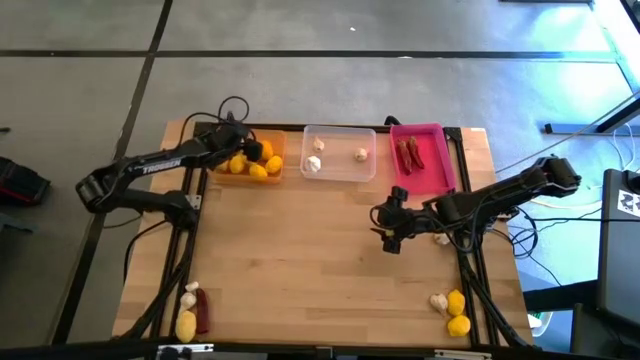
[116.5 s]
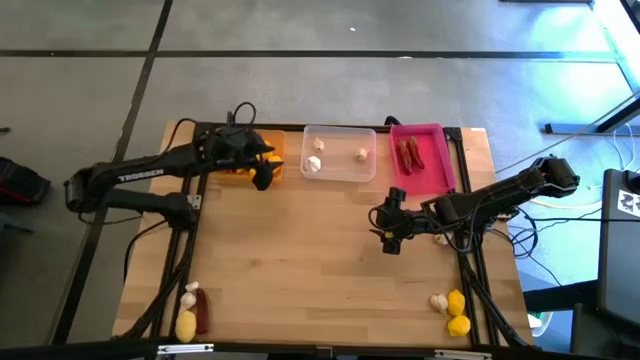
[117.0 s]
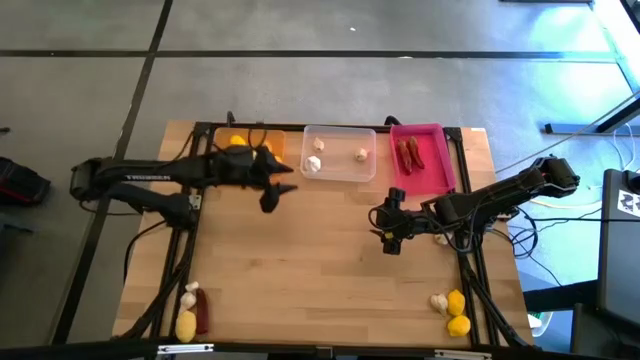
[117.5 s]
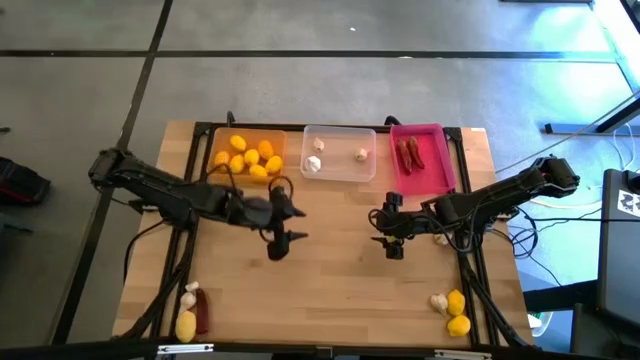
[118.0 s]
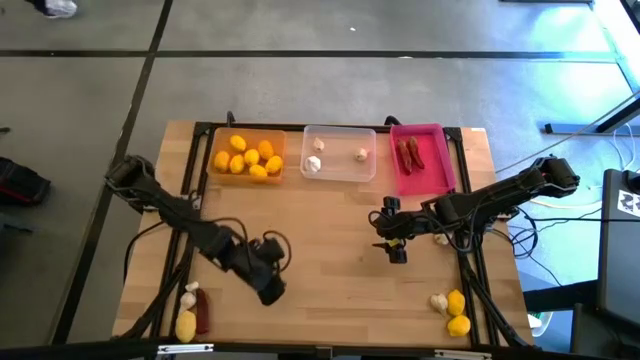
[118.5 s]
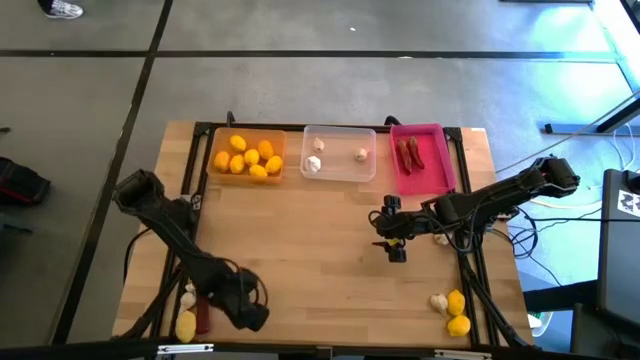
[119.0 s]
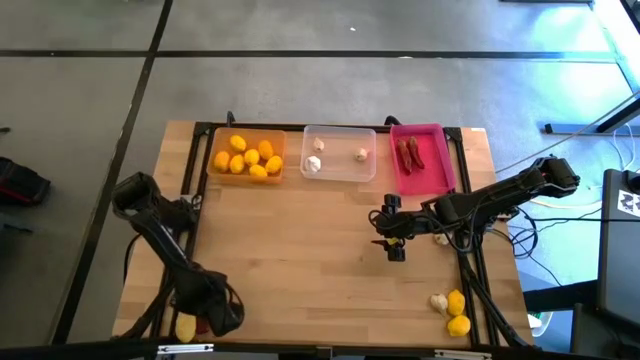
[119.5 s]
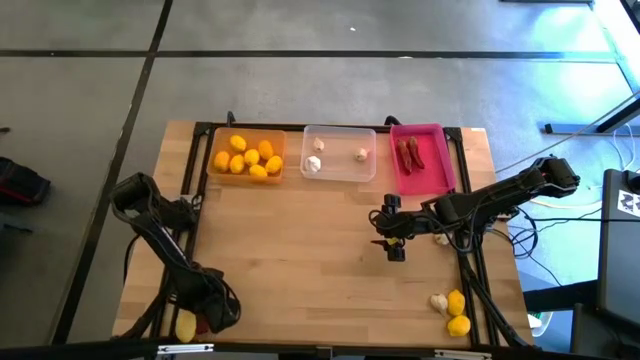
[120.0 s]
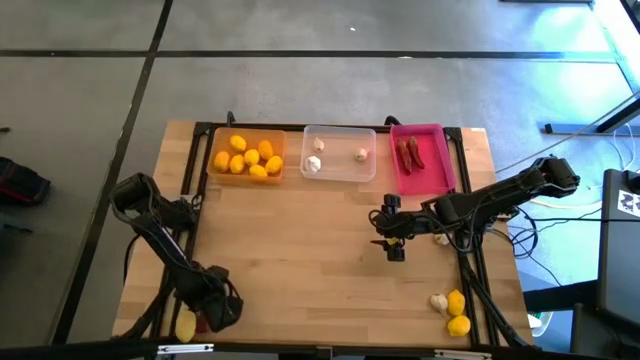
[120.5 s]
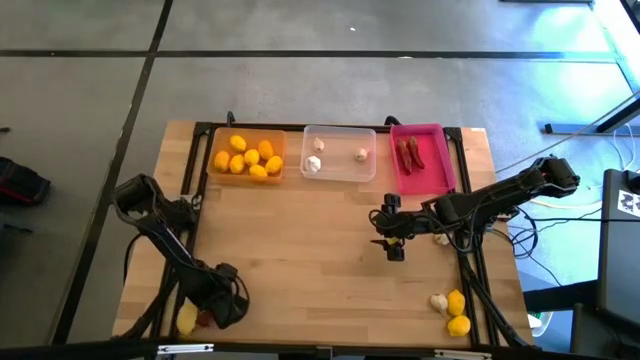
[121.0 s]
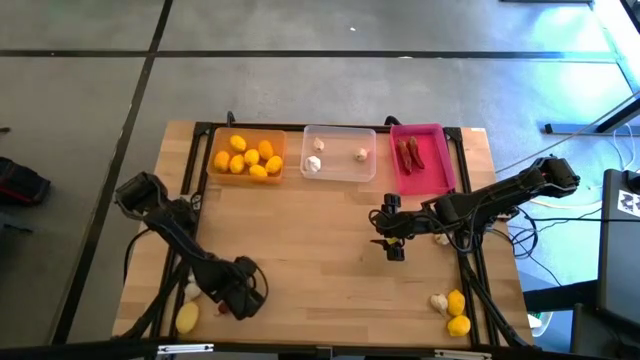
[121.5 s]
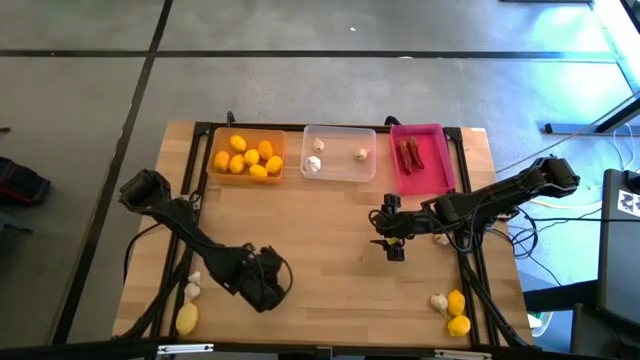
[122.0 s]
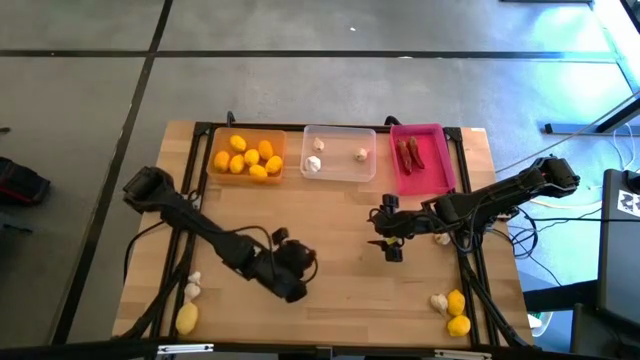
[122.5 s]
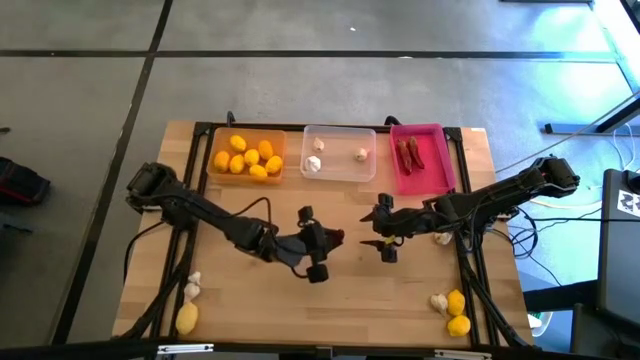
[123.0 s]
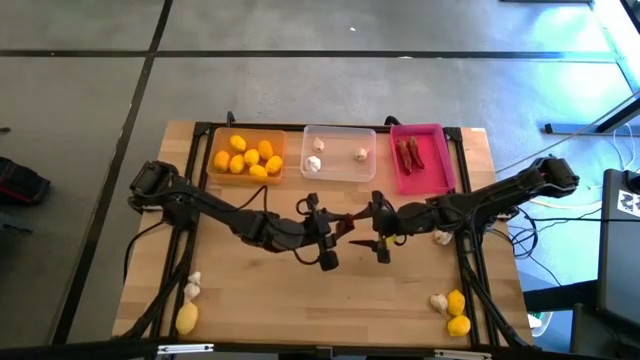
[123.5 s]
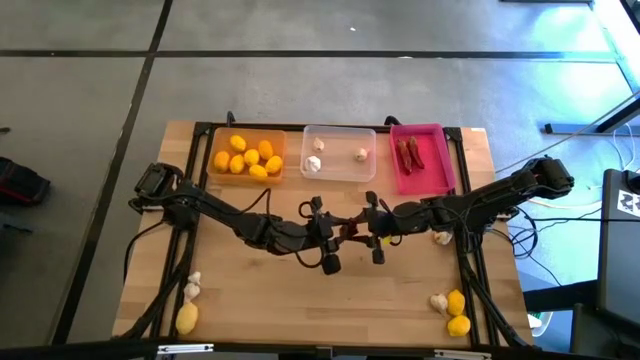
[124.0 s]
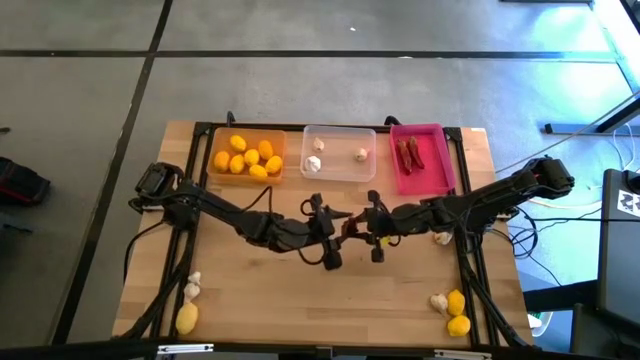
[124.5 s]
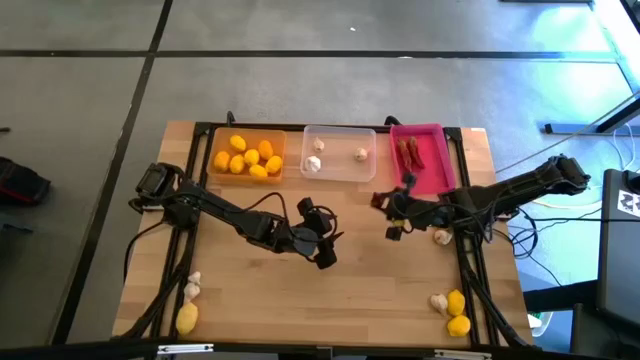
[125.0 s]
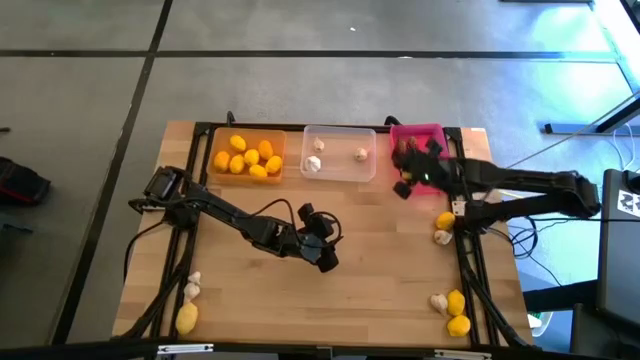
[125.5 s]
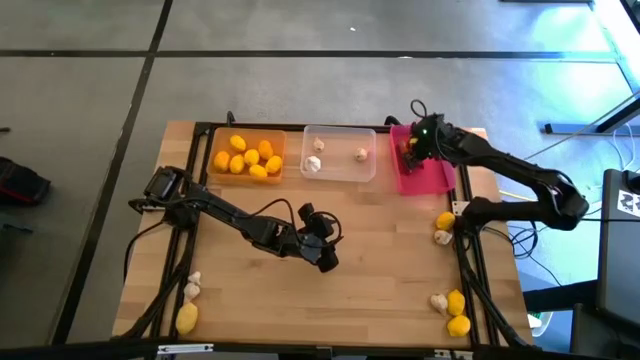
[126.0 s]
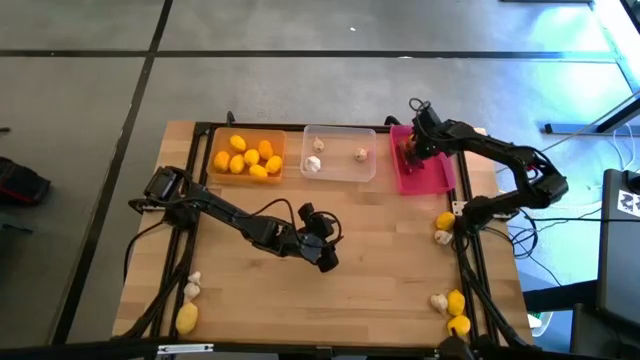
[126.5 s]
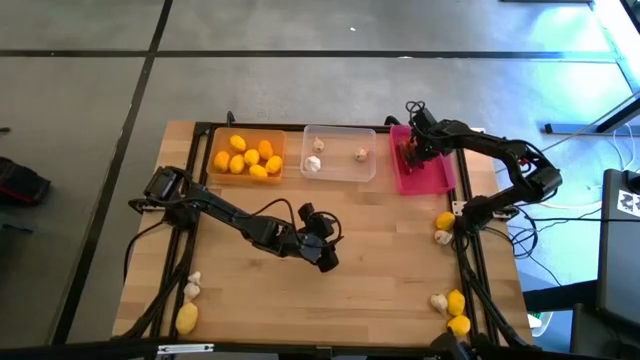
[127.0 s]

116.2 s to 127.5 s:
Task: Sort produce into baskets
Put the red chili pepper into the red bin

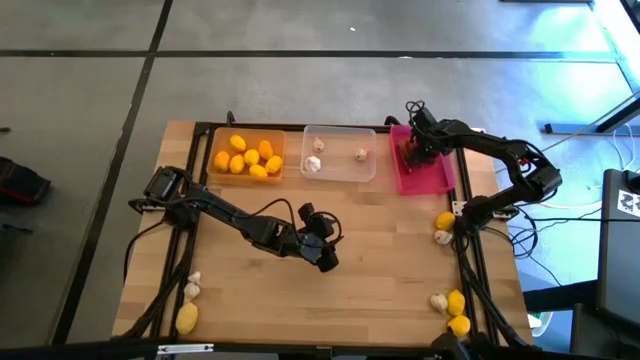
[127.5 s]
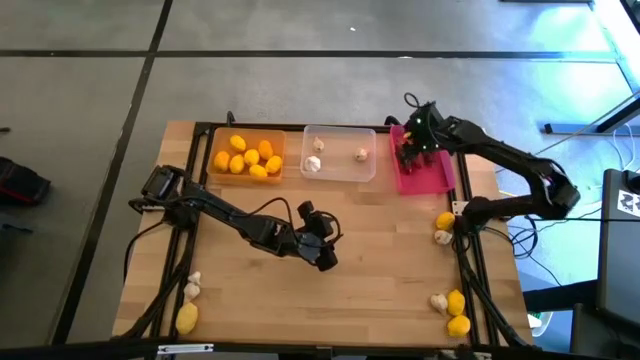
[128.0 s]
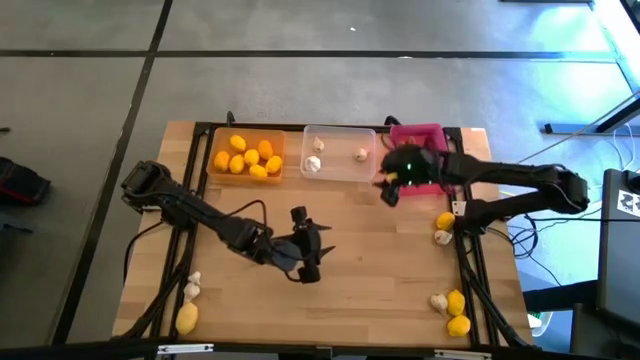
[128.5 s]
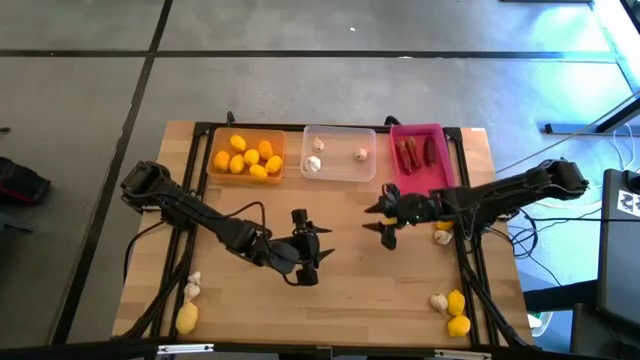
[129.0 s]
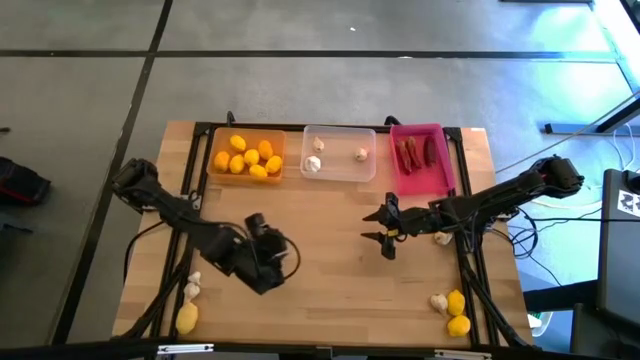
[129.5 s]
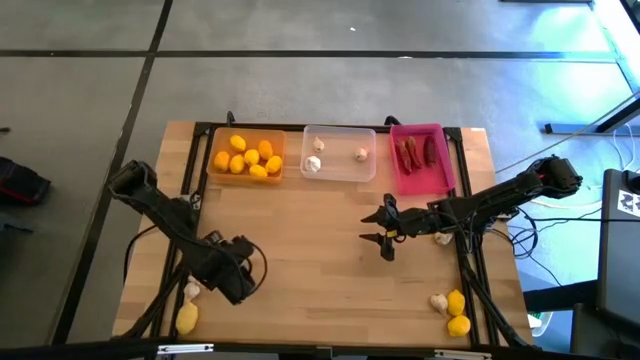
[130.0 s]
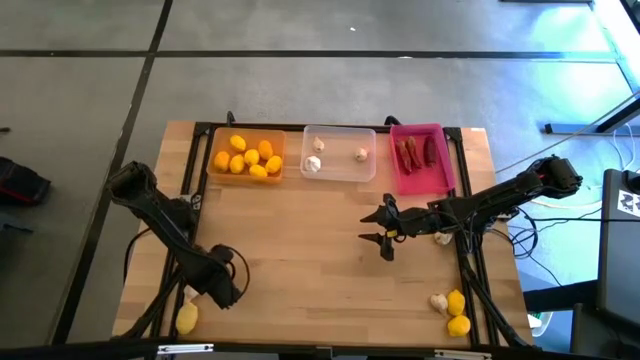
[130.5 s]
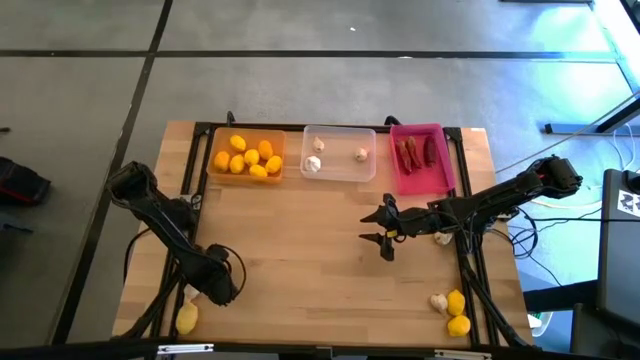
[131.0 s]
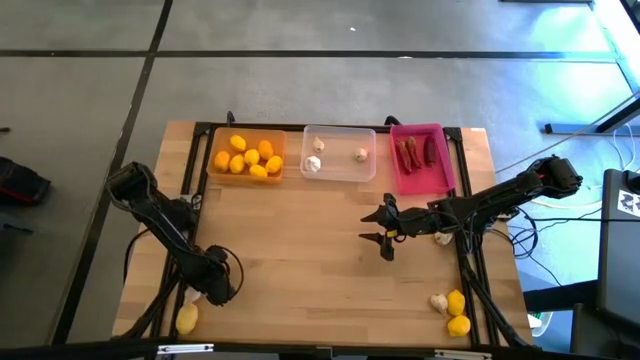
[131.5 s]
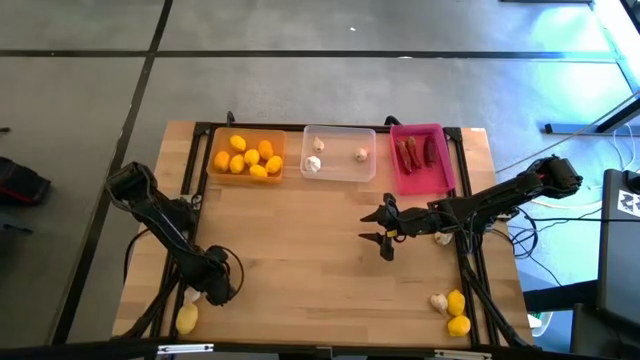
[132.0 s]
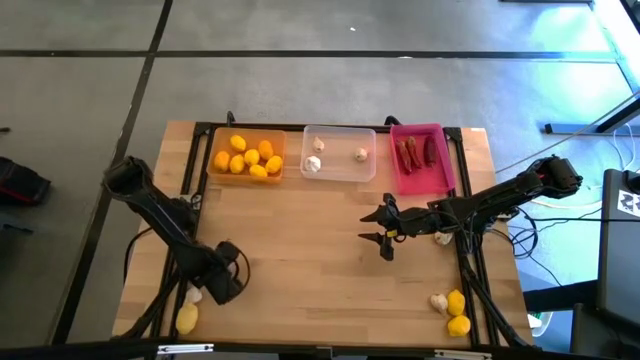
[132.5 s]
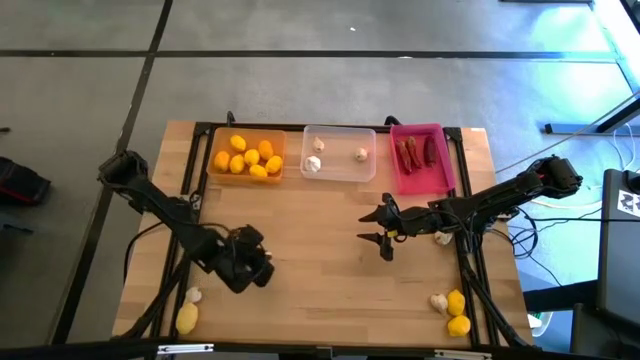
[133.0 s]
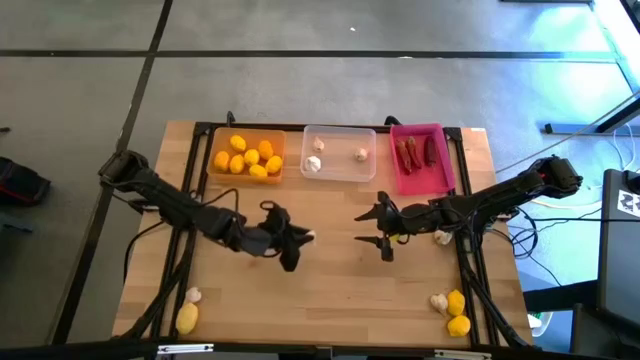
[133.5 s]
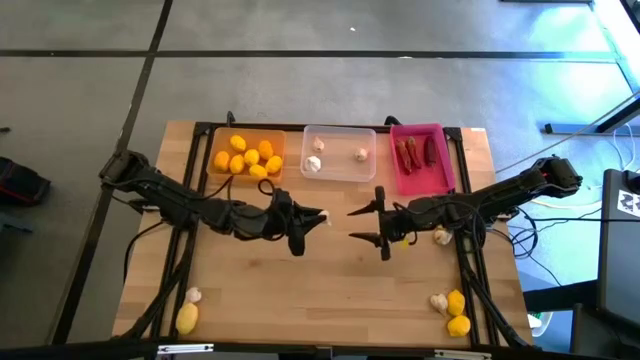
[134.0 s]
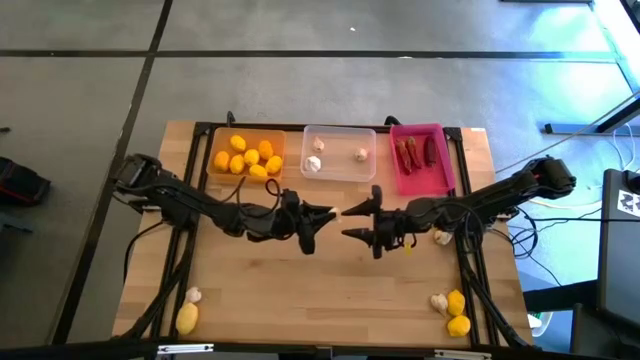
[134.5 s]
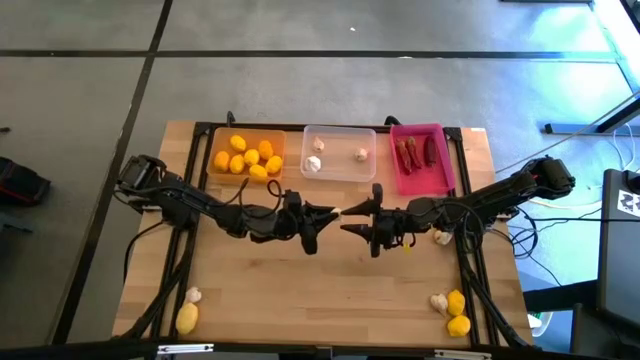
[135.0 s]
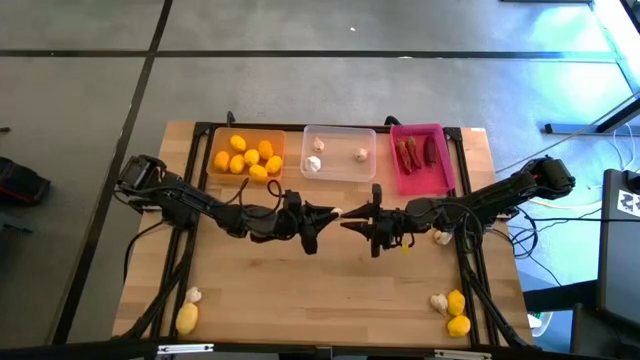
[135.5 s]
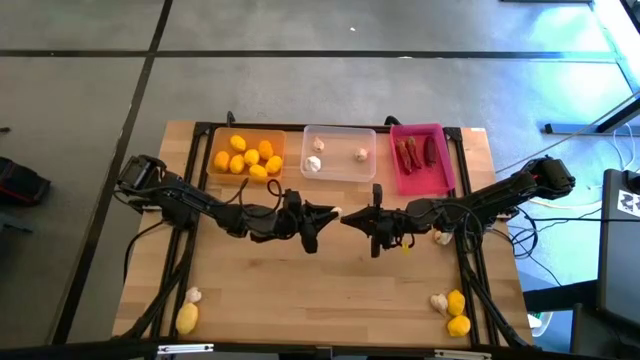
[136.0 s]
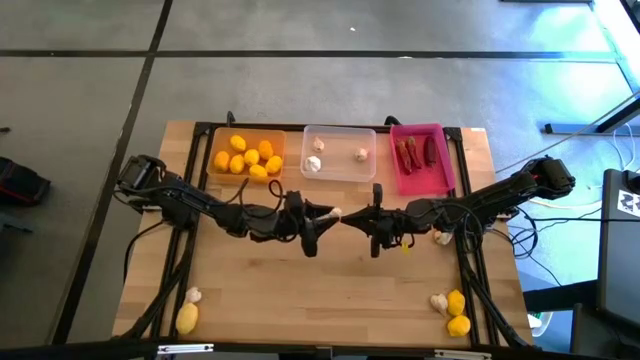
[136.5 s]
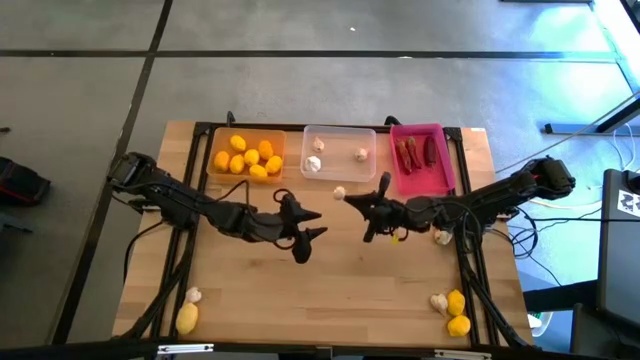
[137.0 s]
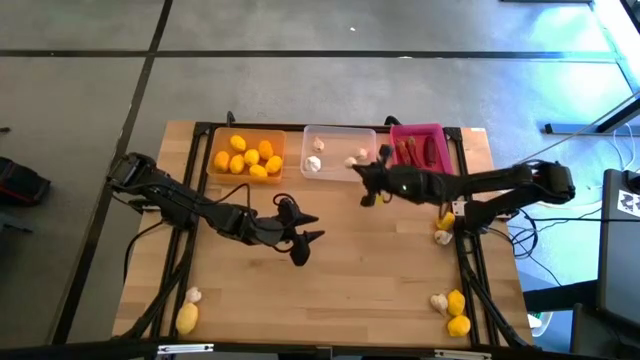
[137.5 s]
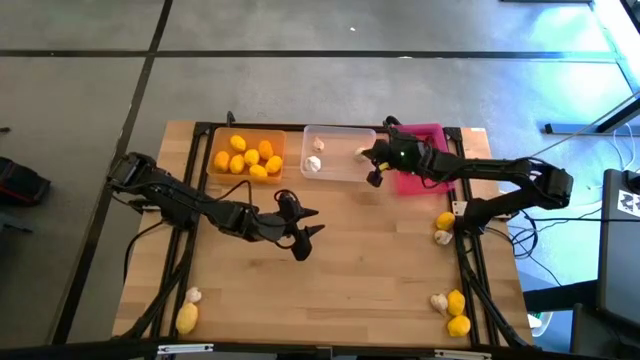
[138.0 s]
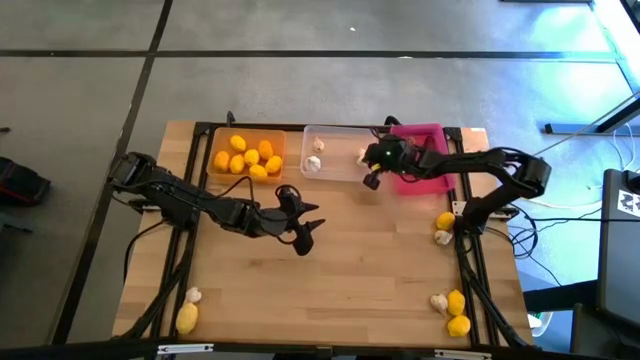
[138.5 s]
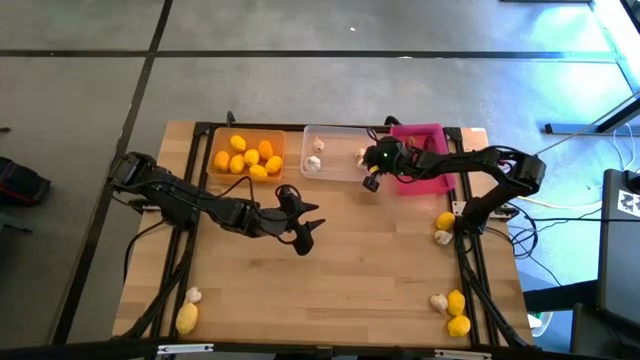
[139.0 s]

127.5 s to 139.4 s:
Put the white garlic into the transparent bin
